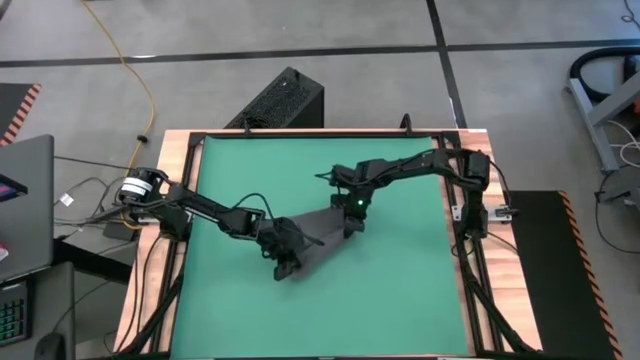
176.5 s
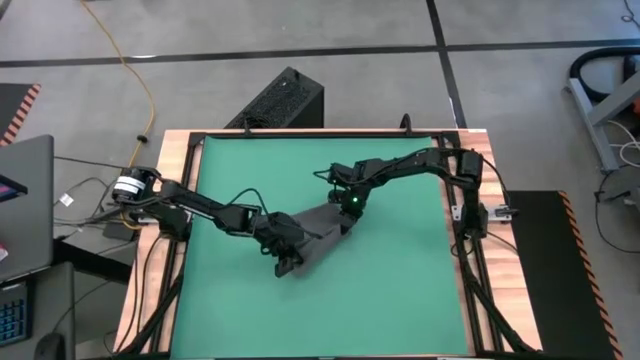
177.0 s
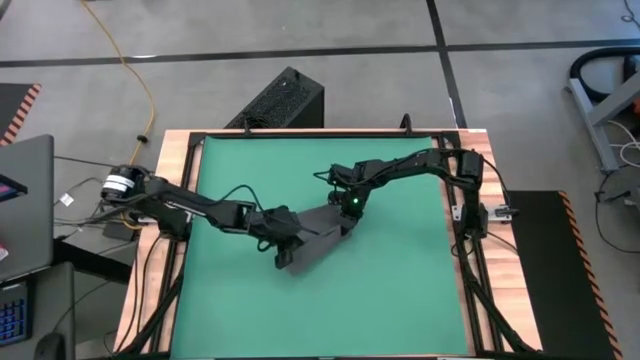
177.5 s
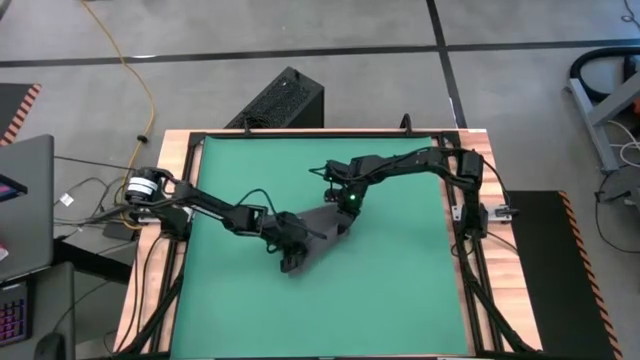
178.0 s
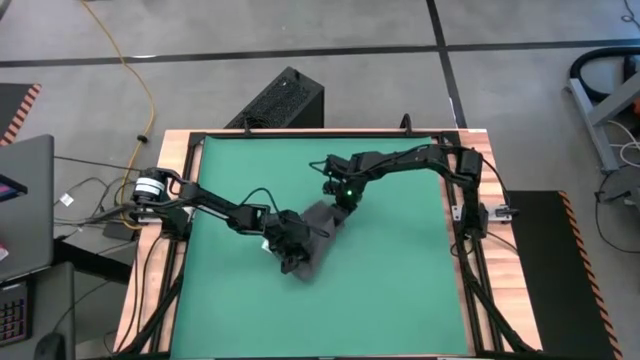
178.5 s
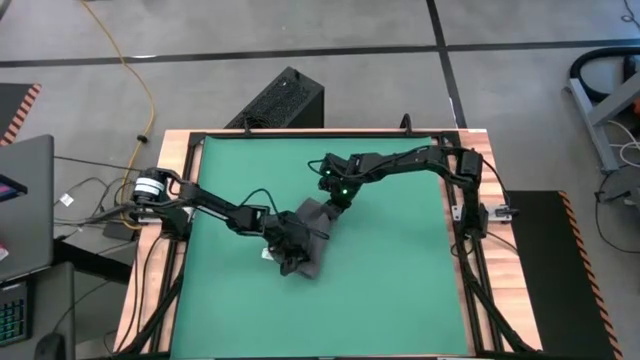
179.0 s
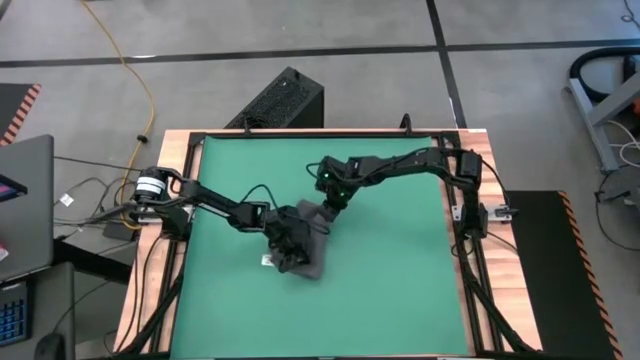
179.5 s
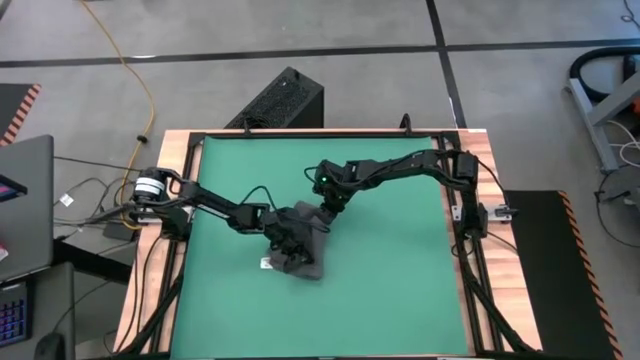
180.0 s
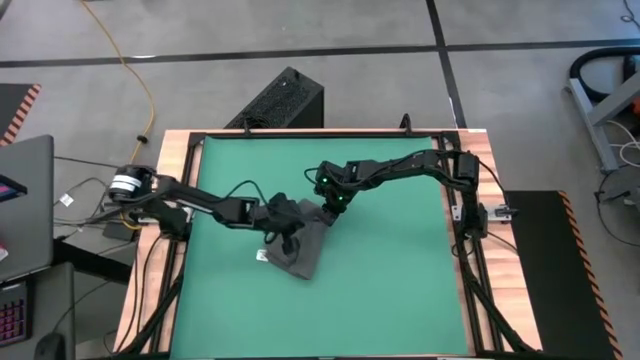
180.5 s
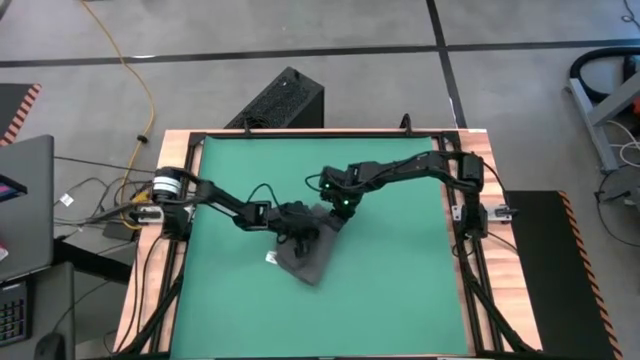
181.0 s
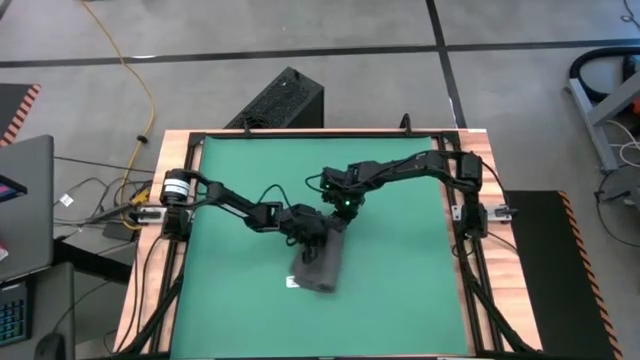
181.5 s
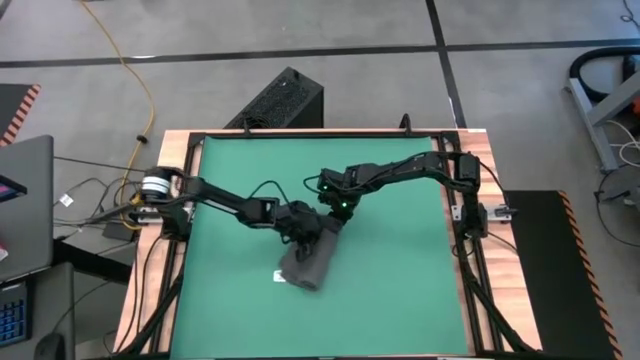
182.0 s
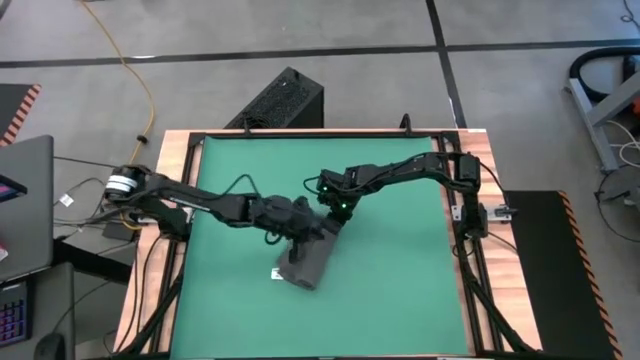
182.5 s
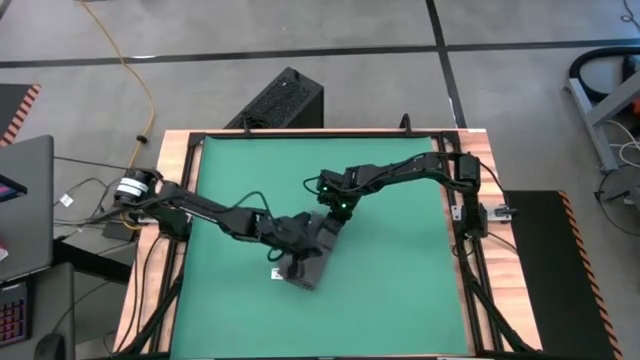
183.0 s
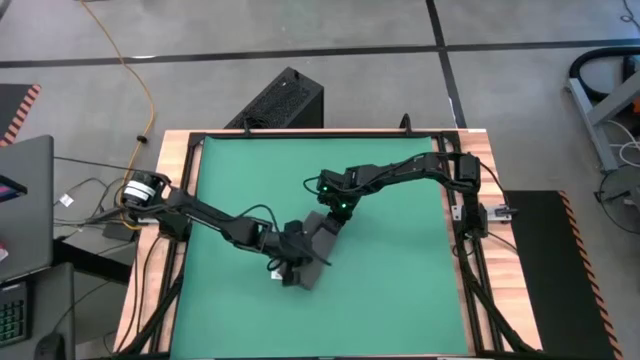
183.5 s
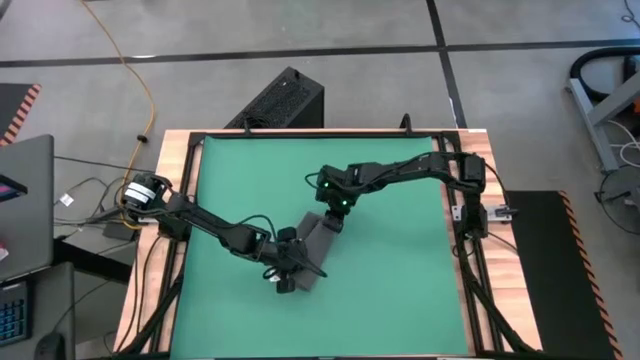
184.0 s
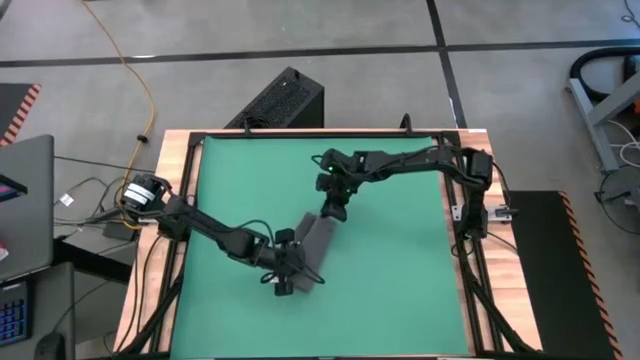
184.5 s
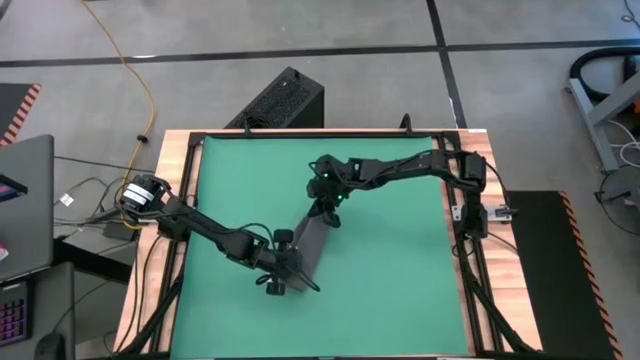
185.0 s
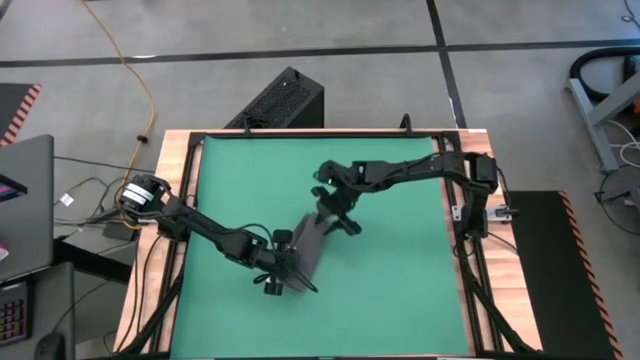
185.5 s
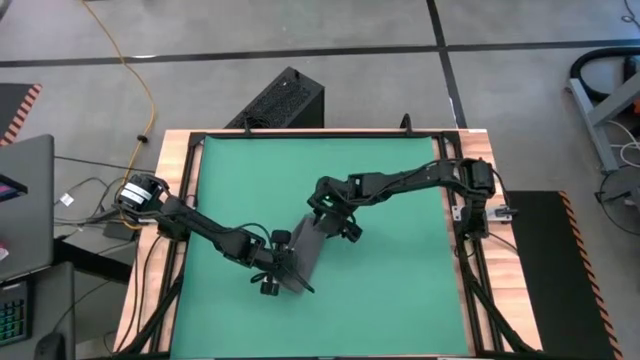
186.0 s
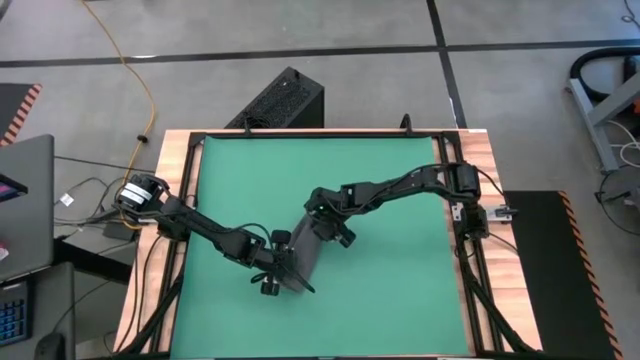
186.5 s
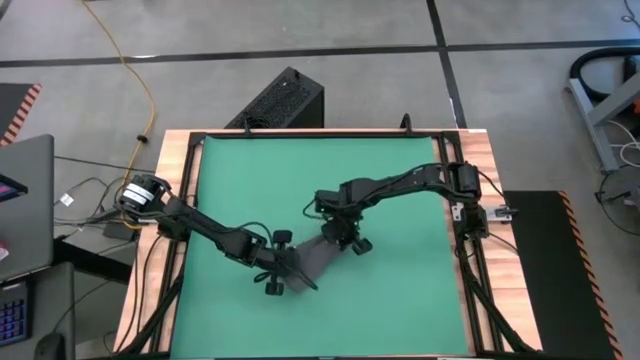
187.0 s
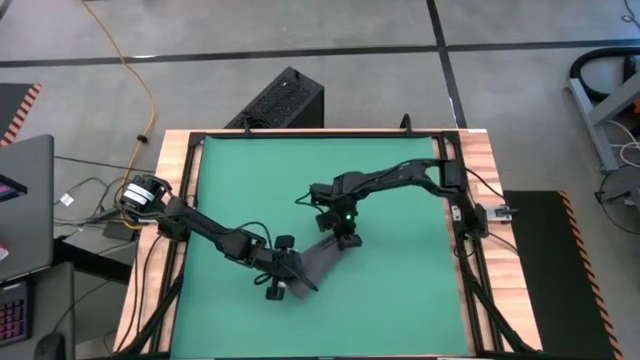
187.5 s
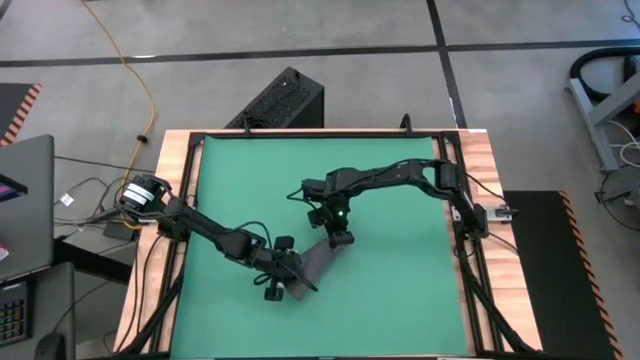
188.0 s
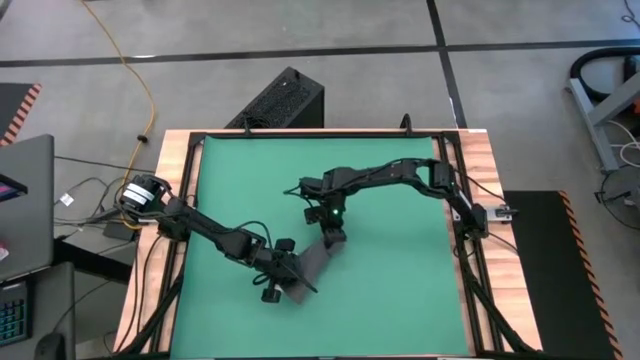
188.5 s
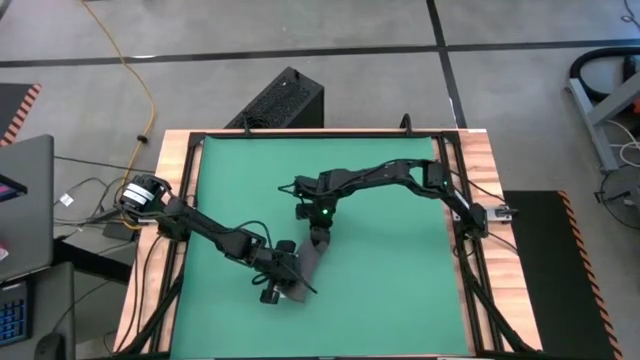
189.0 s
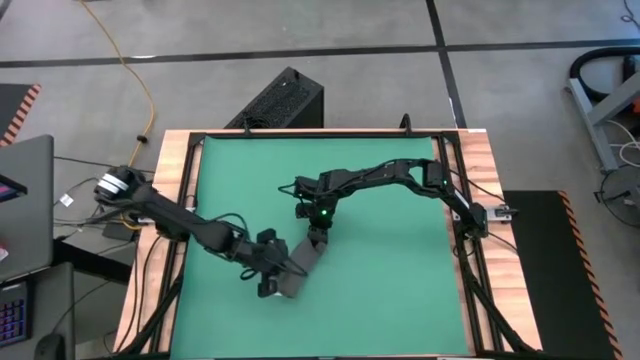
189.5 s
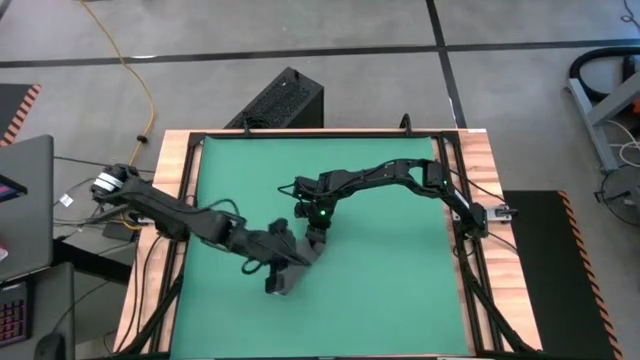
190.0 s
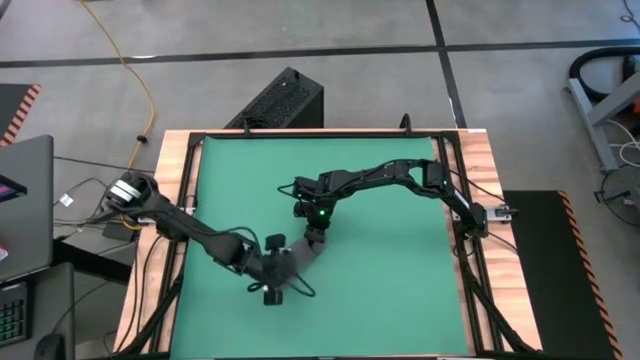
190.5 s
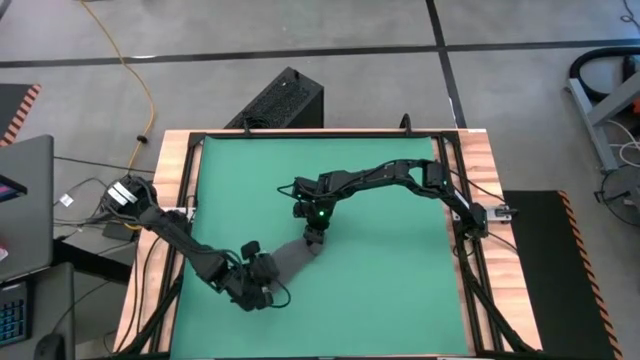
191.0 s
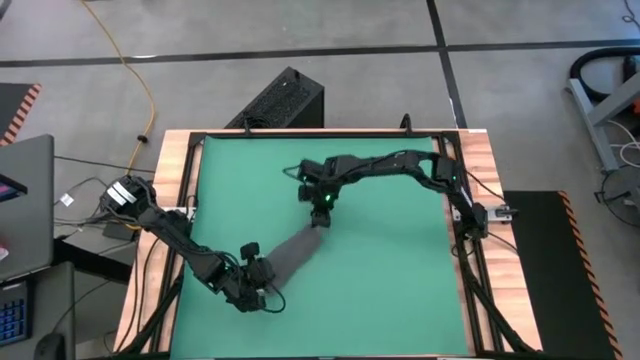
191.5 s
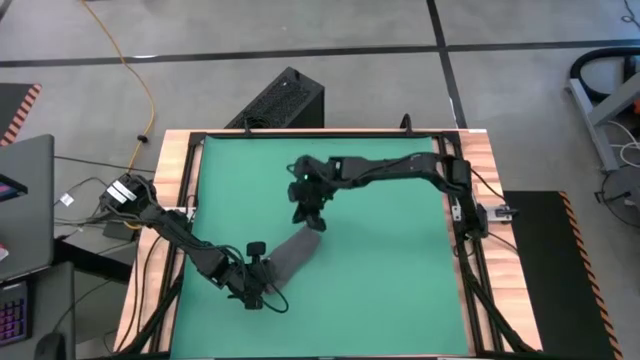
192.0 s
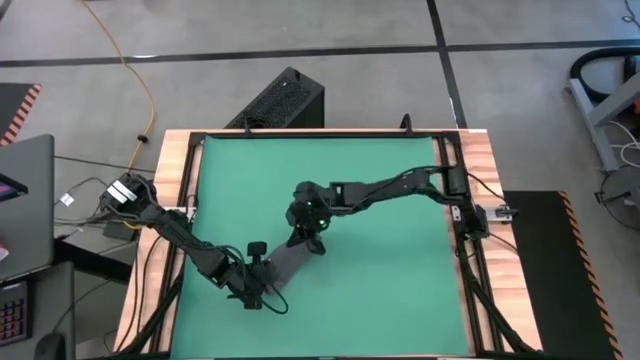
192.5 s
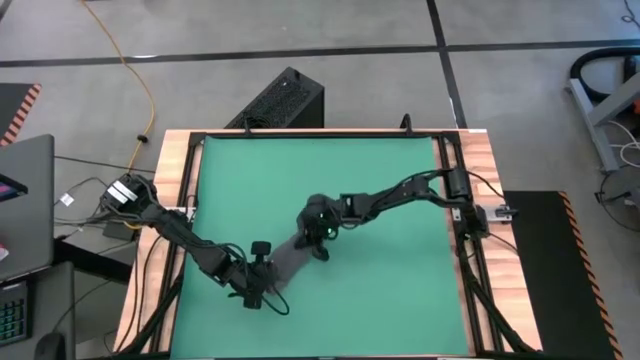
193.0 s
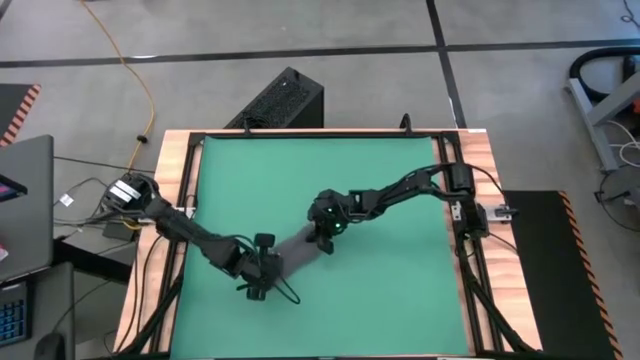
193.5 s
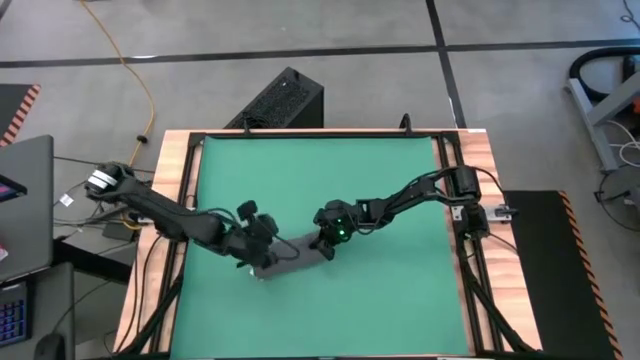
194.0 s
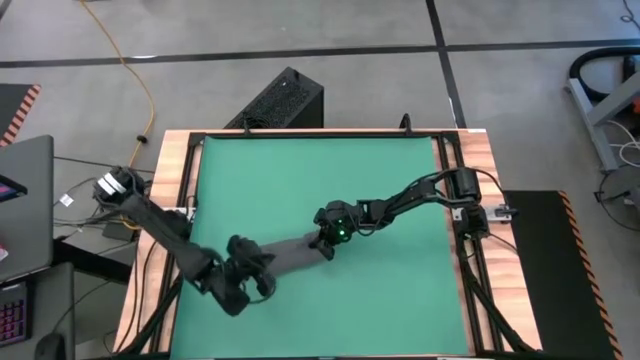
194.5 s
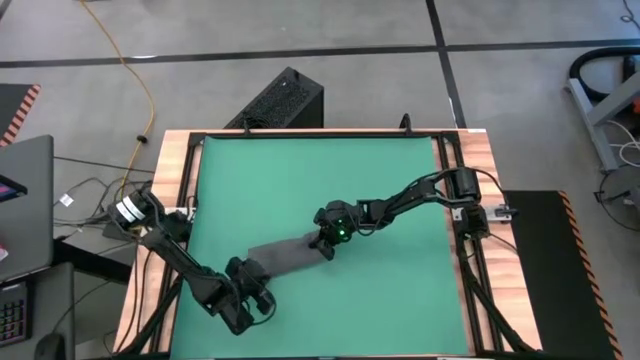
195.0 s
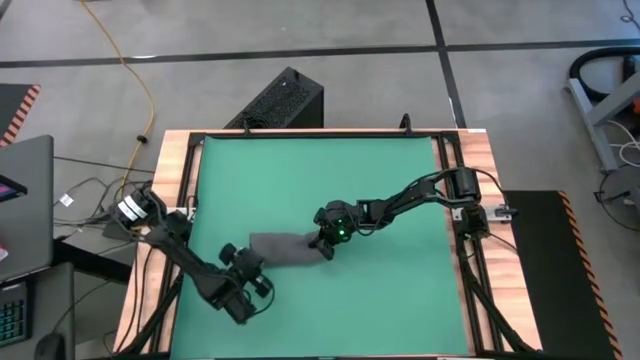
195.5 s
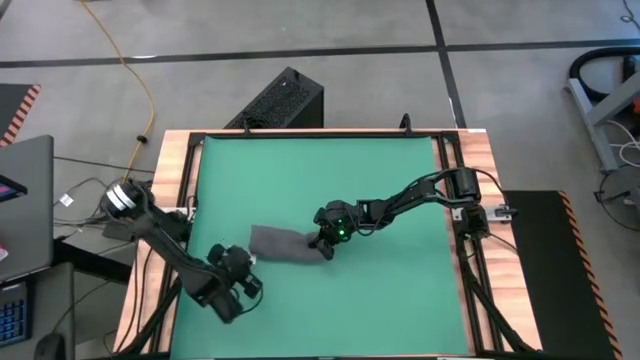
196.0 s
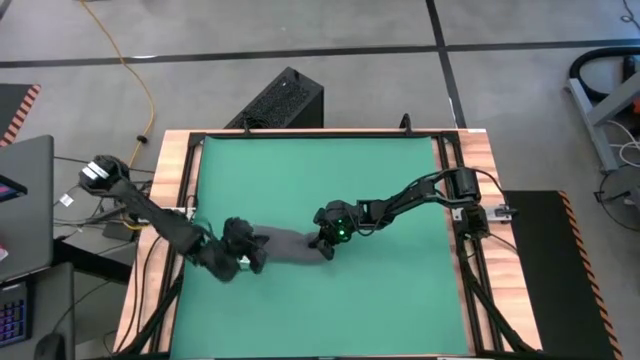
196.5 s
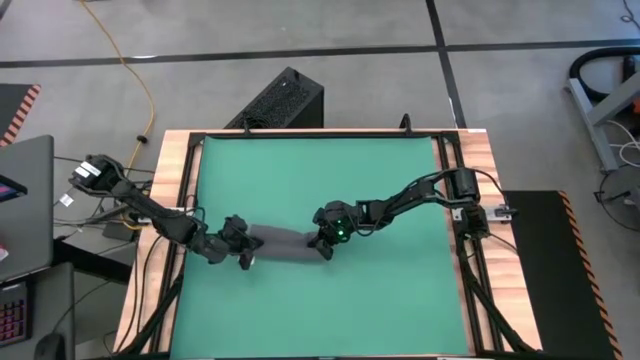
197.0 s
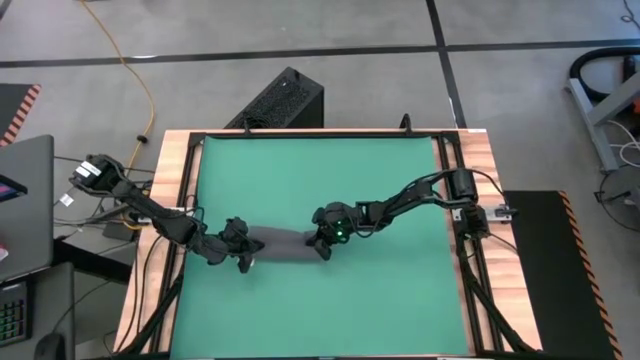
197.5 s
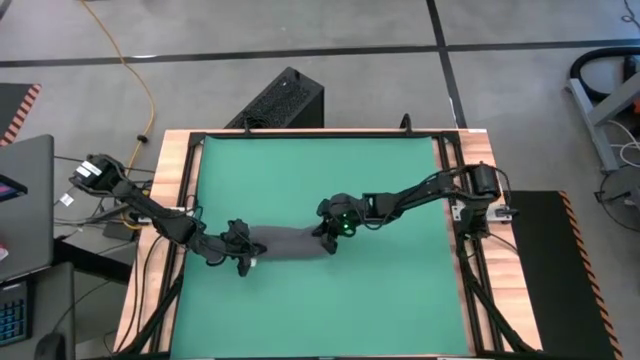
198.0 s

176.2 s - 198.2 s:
Task: Roll towel
Roll the microfiber towel
